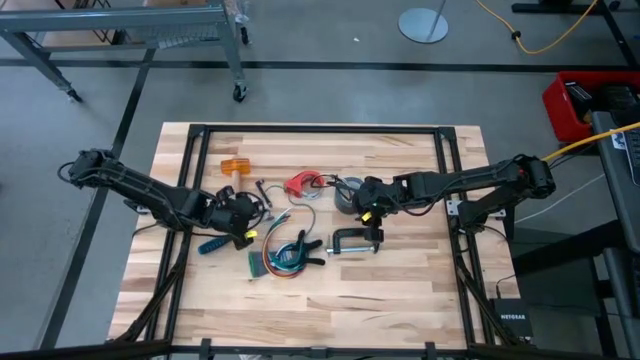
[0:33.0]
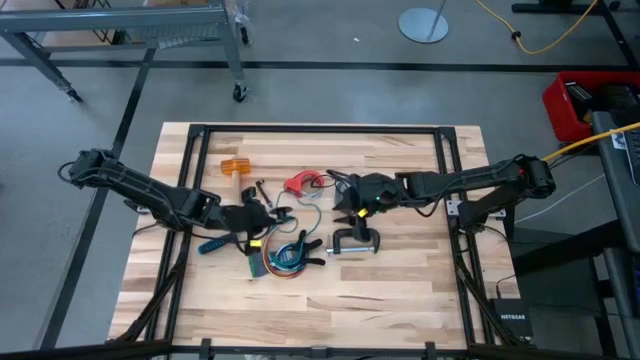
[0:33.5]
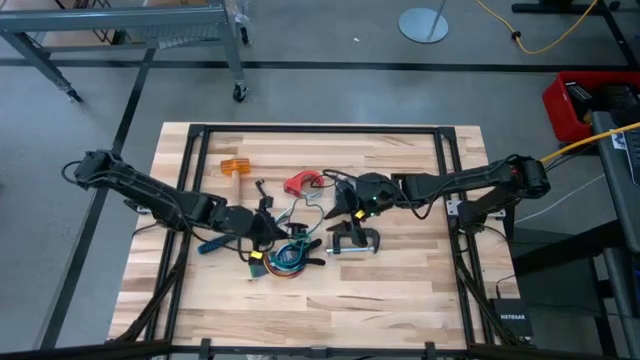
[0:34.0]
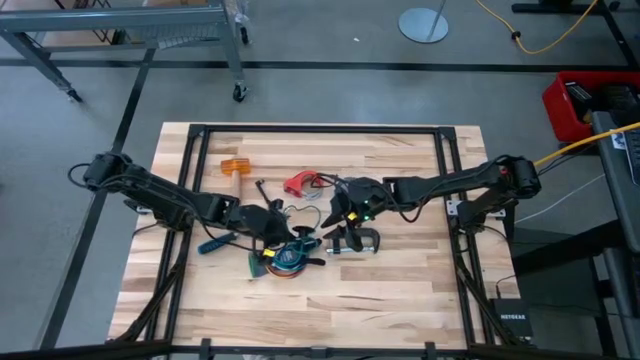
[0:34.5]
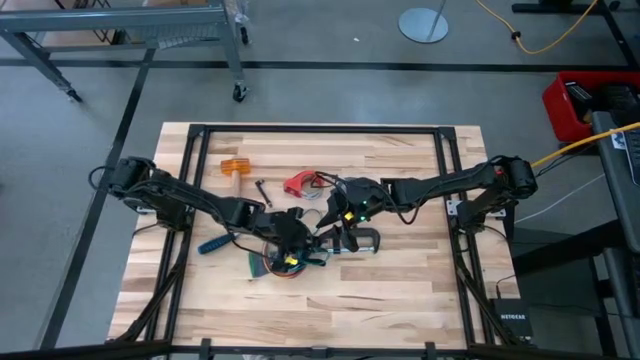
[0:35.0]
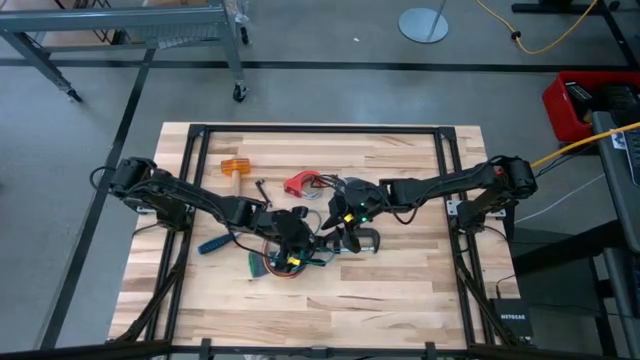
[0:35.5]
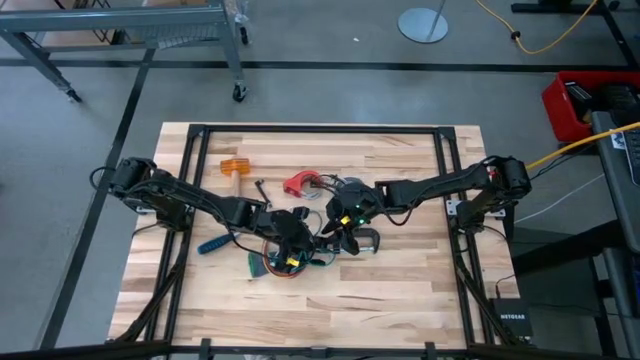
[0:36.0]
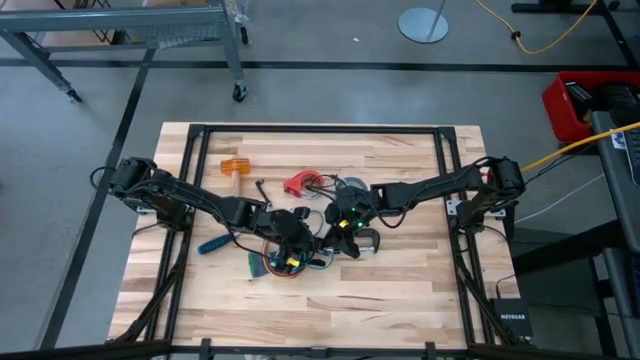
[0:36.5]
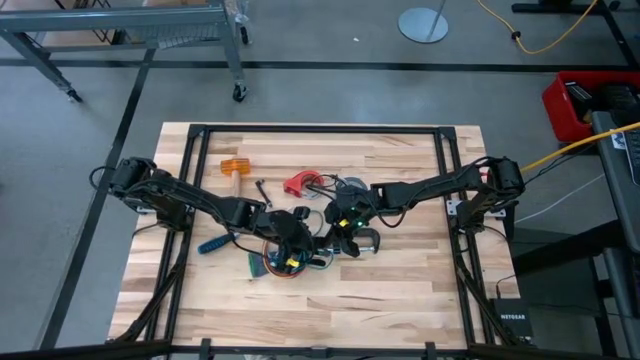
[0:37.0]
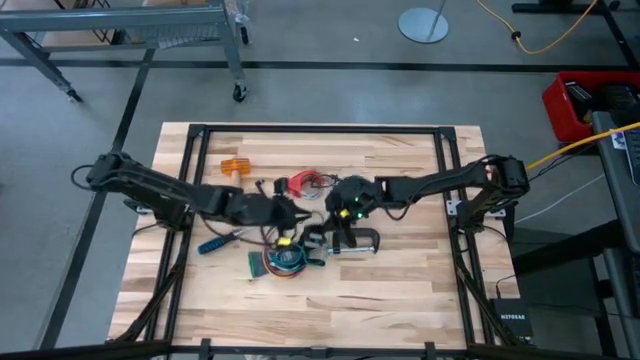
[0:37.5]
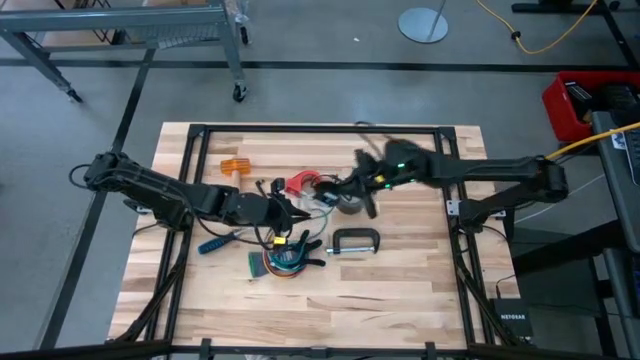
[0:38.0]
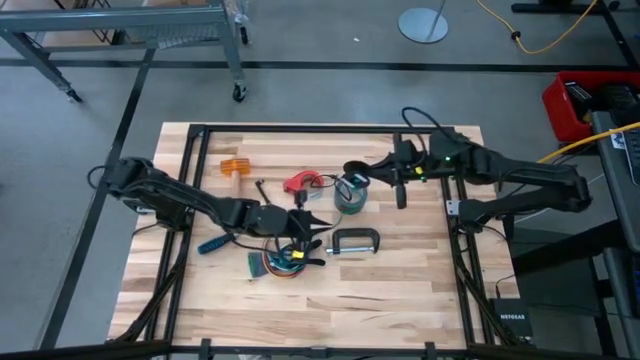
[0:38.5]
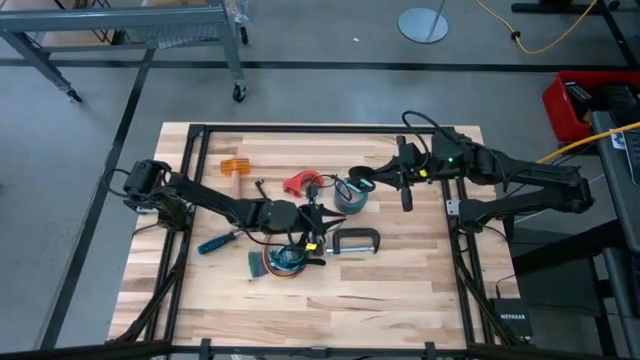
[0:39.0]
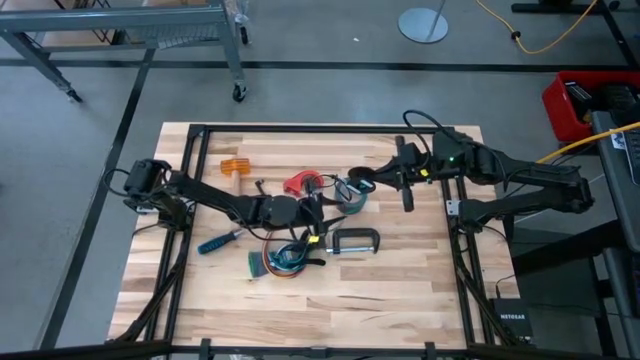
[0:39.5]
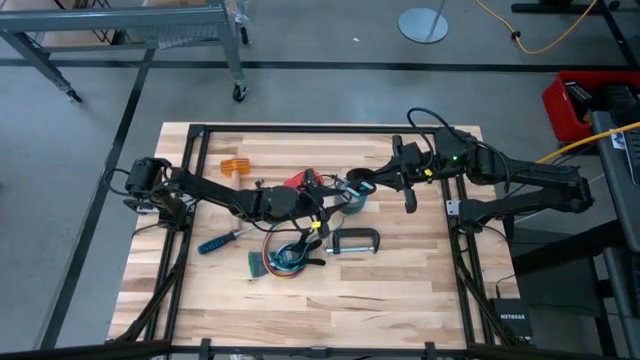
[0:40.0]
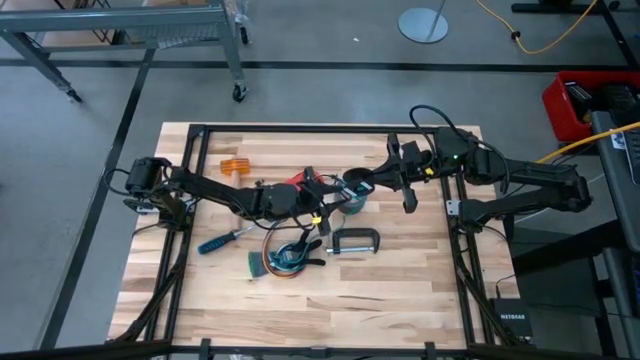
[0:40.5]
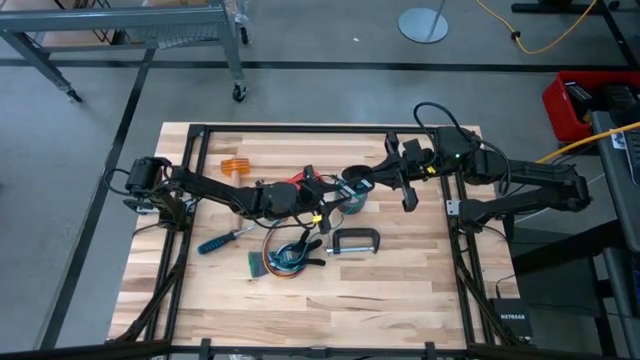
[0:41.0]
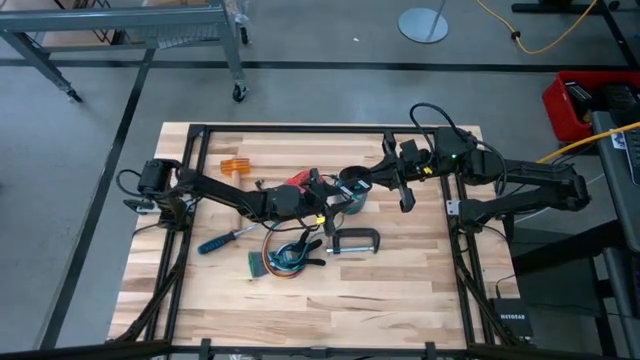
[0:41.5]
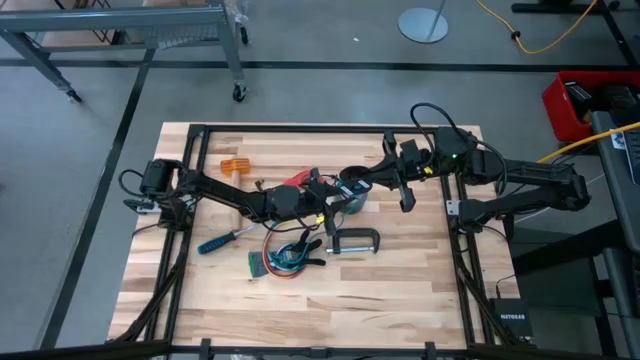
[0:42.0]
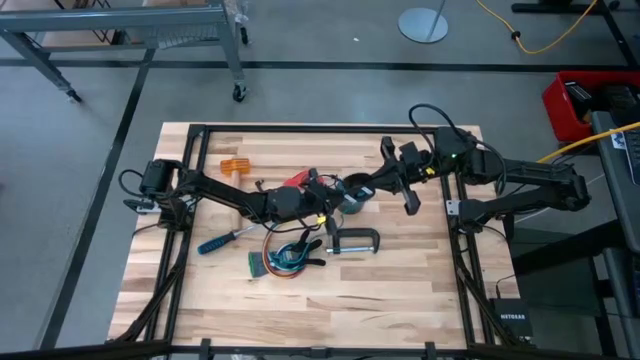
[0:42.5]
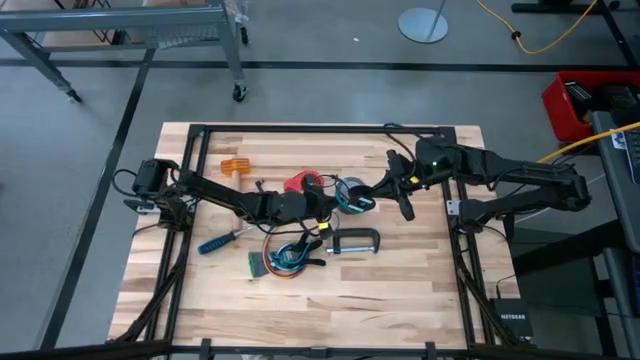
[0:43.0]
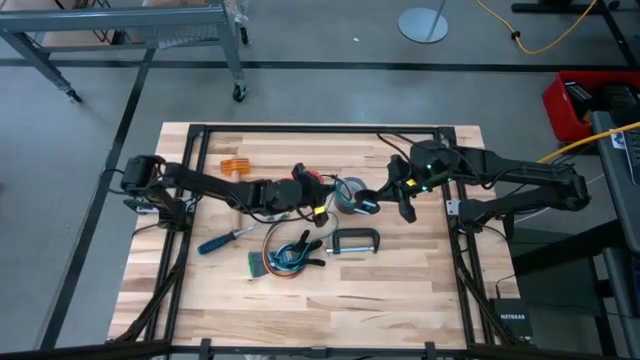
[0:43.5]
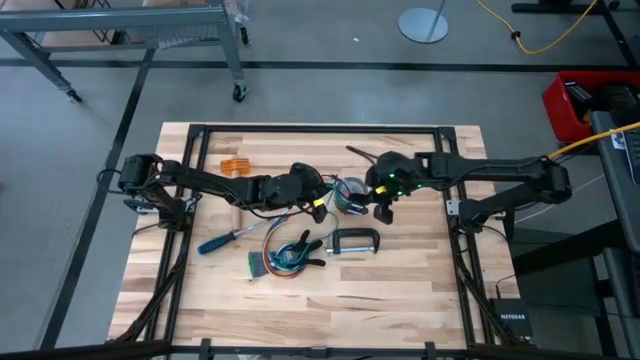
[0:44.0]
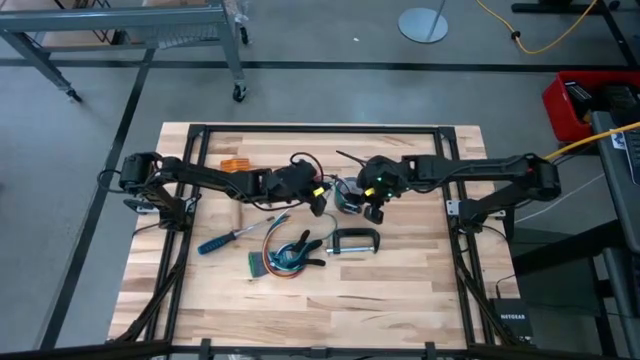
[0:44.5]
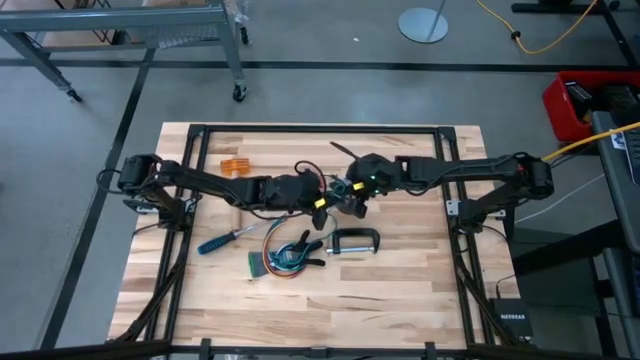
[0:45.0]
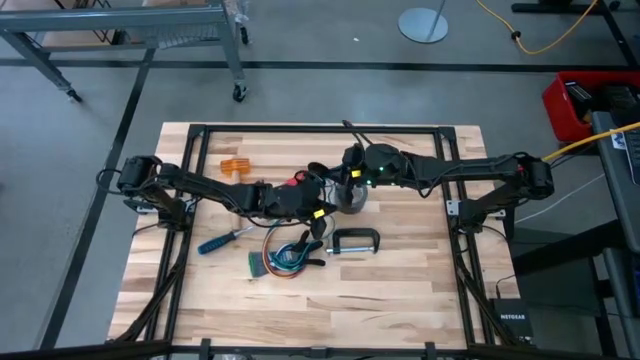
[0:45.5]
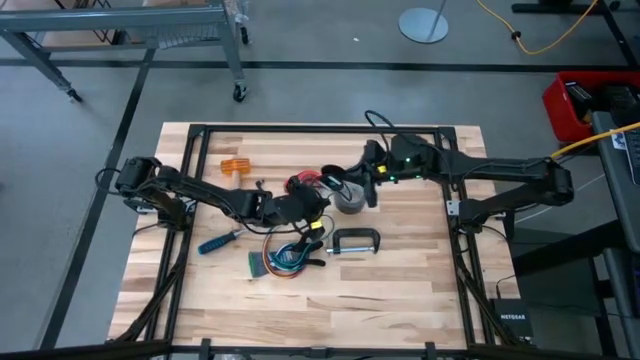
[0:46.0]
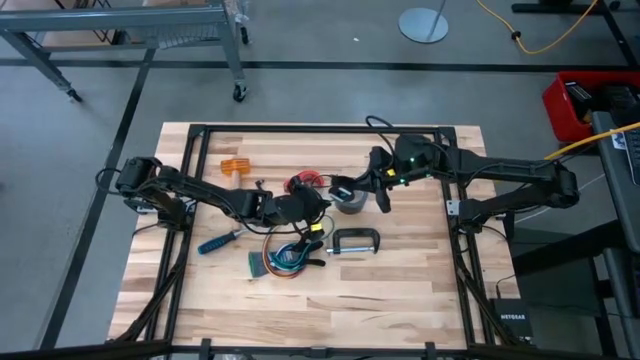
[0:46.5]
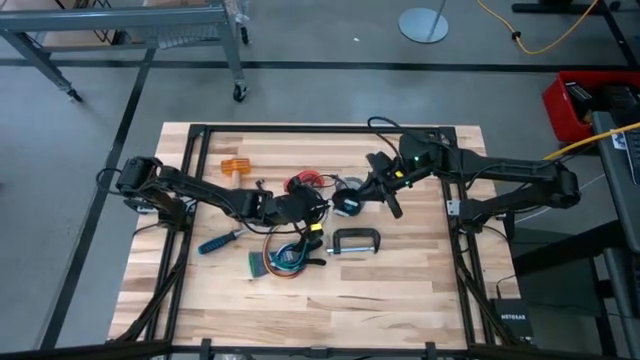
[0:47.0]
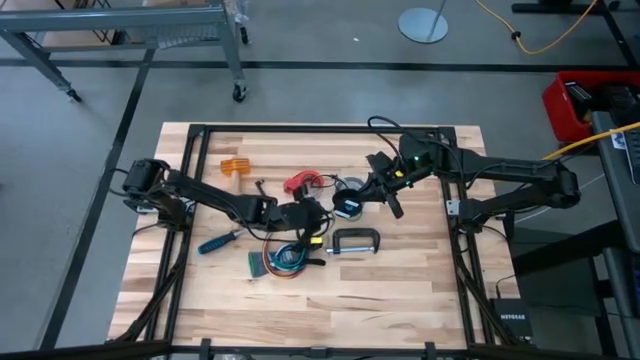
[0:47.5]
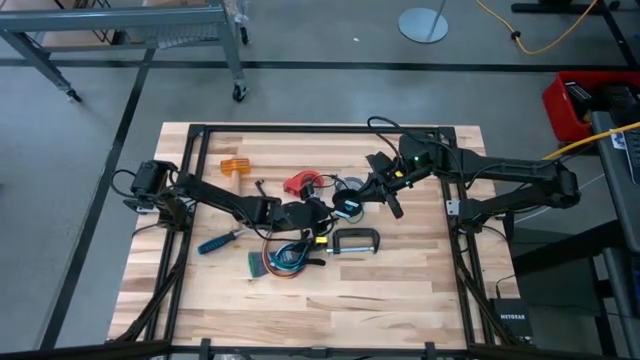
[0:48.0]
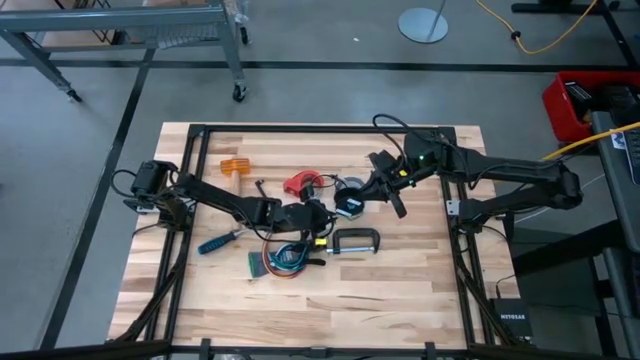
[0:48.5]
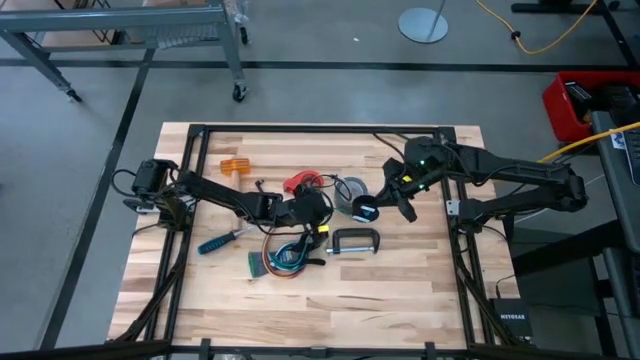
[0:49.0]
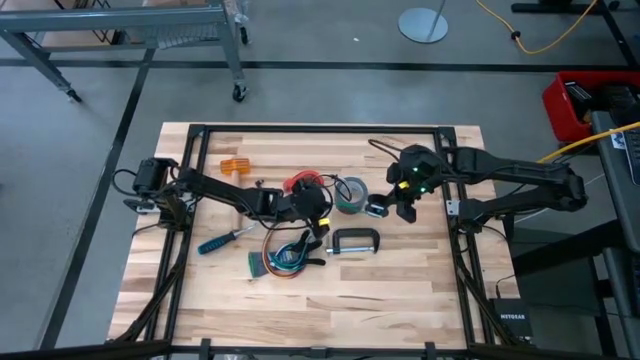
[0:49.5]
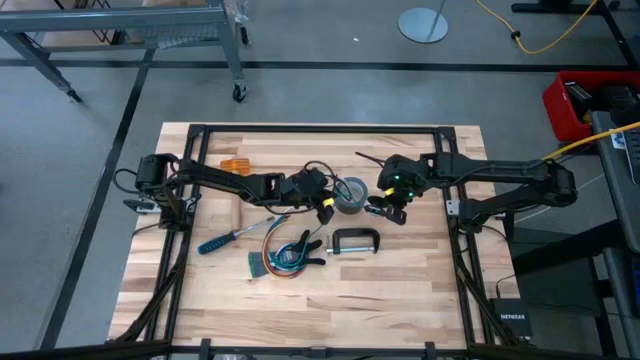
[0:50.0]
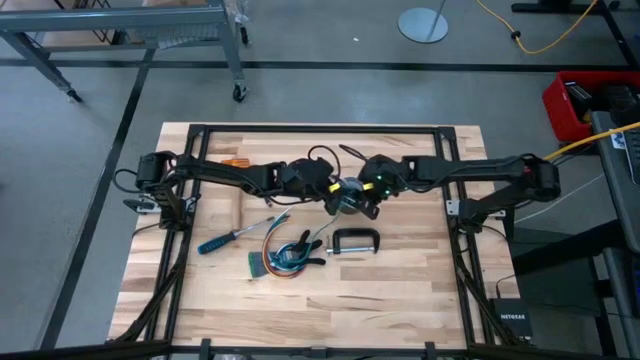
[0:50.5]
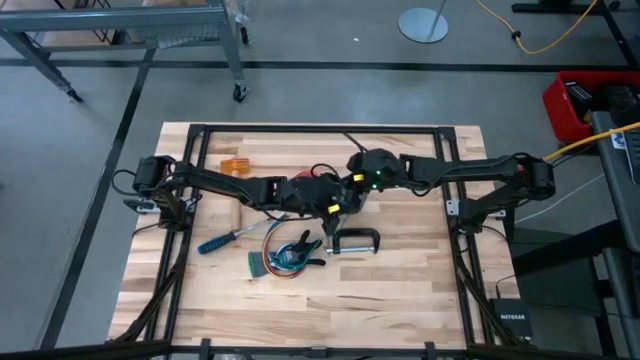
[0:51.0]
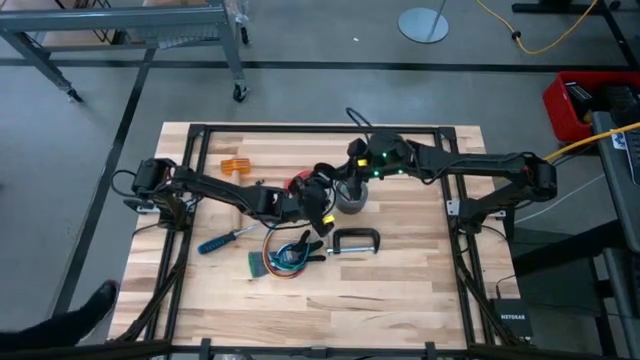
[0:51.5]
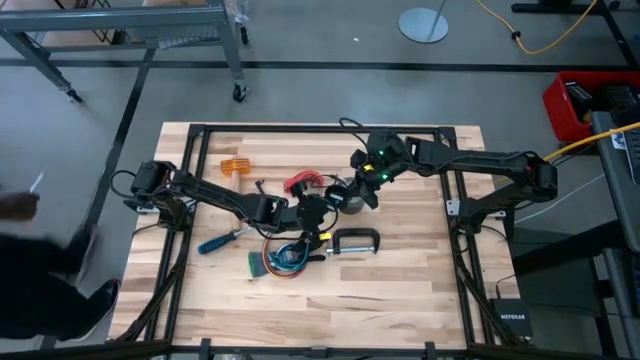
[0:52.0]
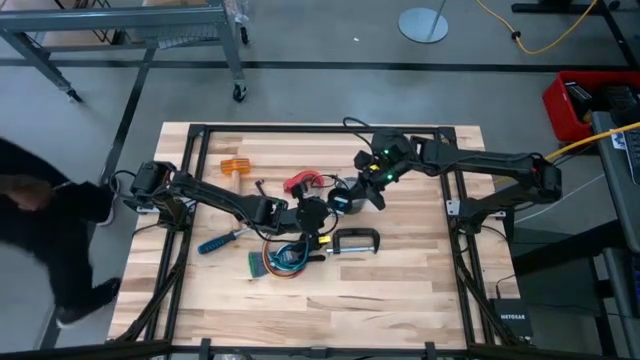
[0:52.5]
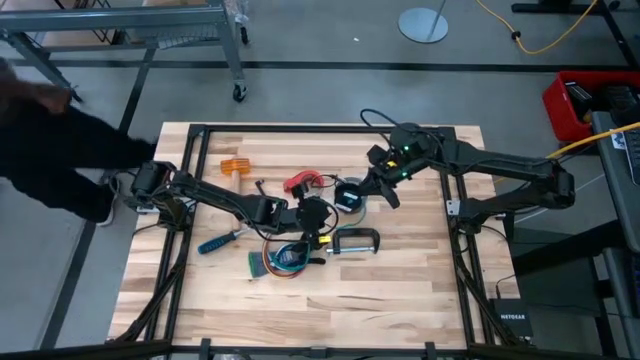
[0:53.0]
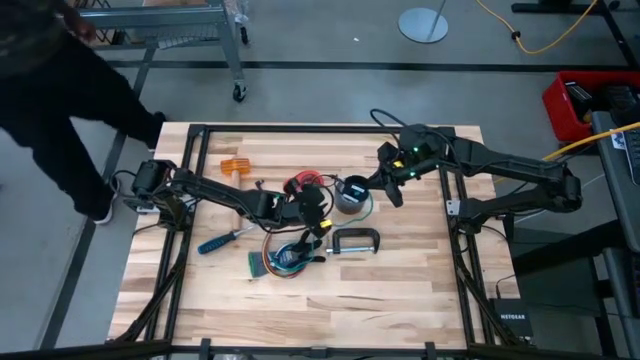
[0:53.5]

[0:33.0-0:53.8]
Task: Coil cords
Coil the blue wire onto the spool
